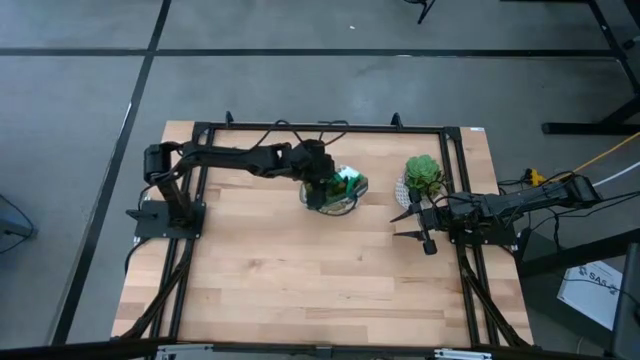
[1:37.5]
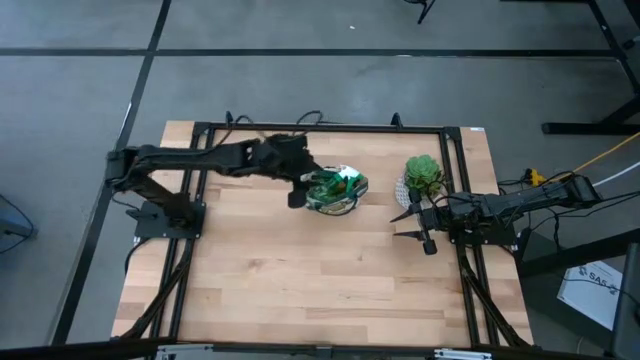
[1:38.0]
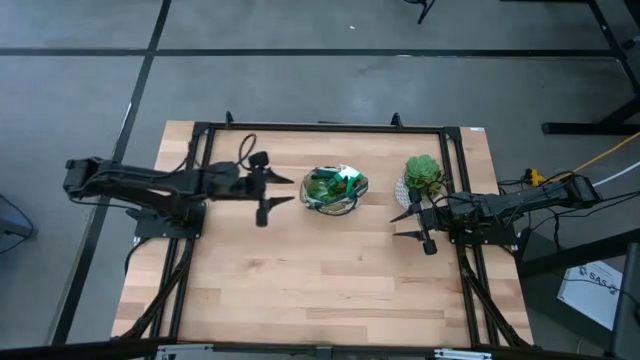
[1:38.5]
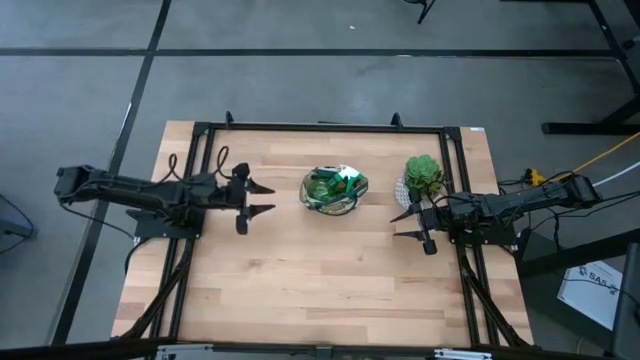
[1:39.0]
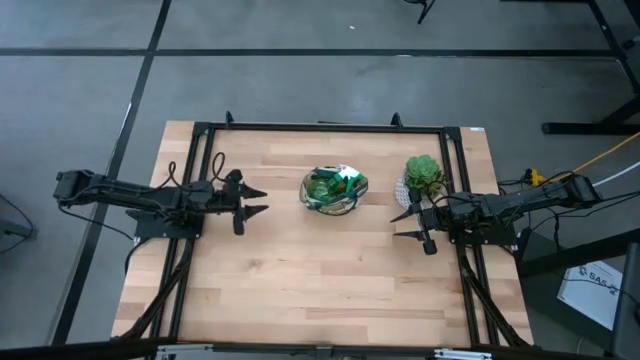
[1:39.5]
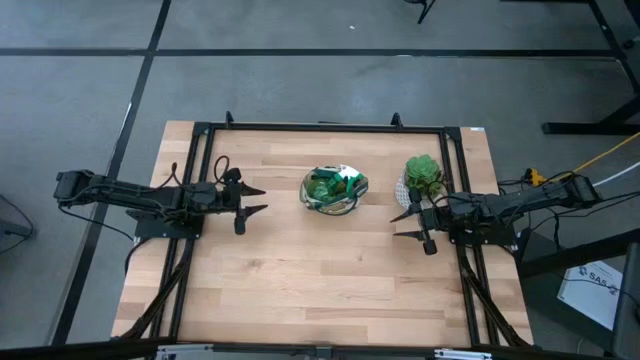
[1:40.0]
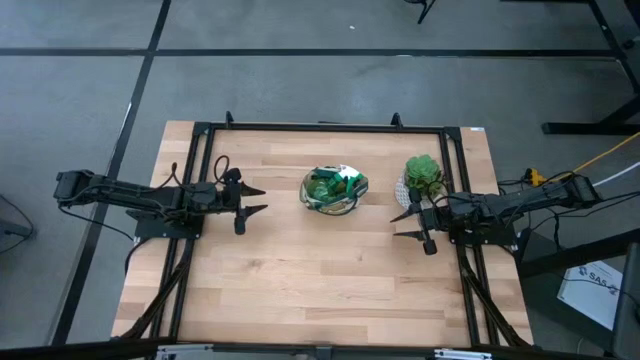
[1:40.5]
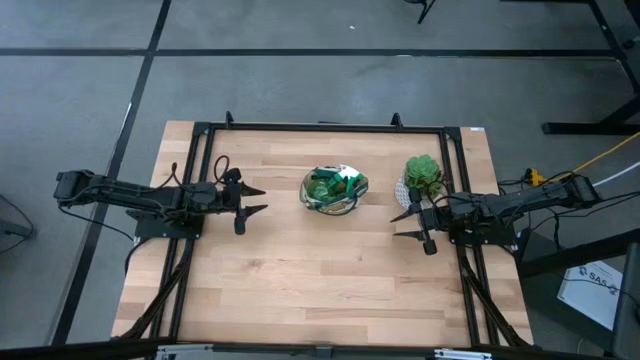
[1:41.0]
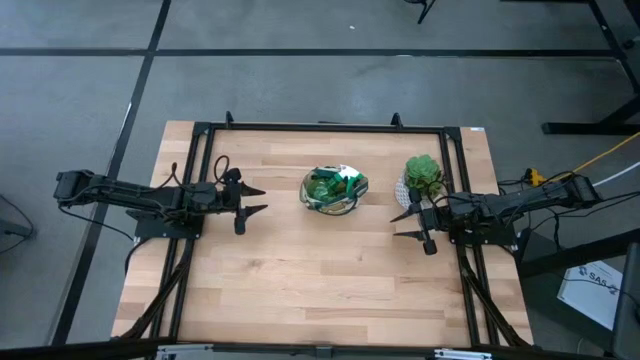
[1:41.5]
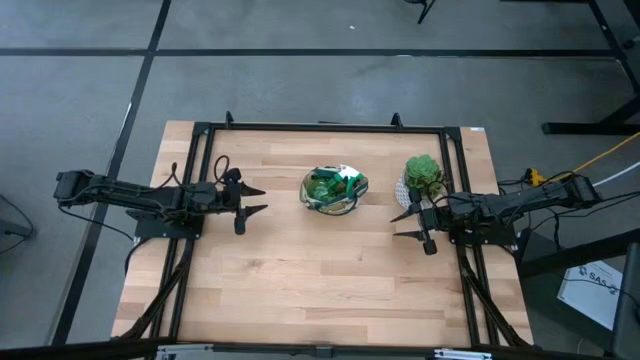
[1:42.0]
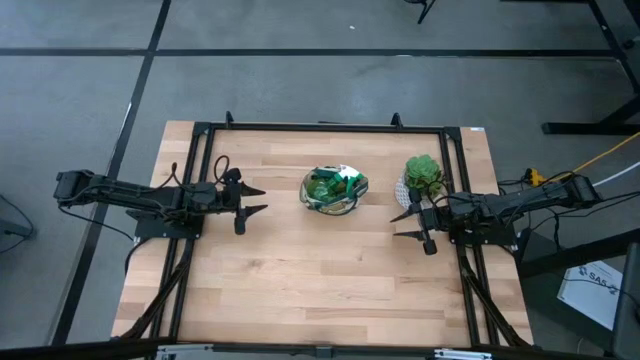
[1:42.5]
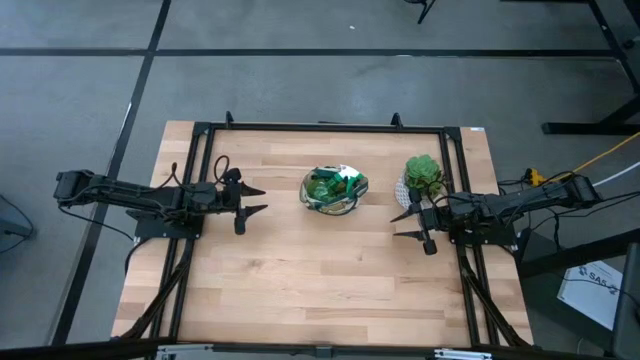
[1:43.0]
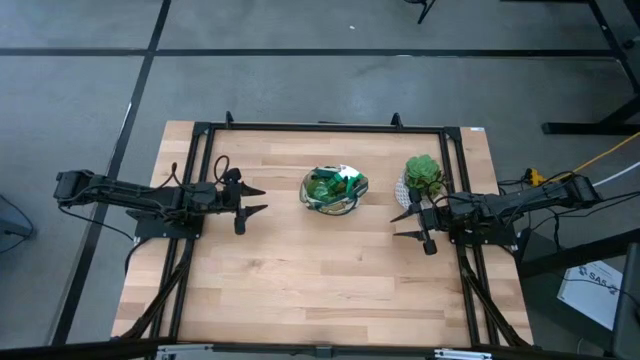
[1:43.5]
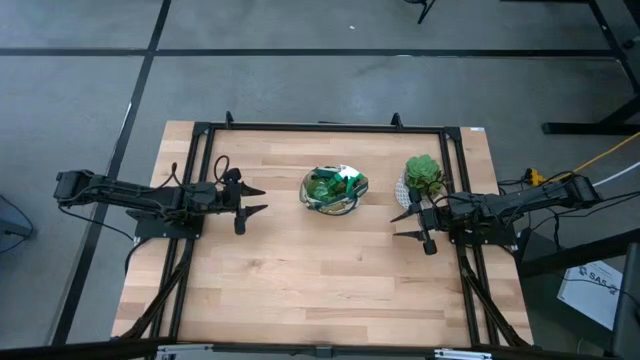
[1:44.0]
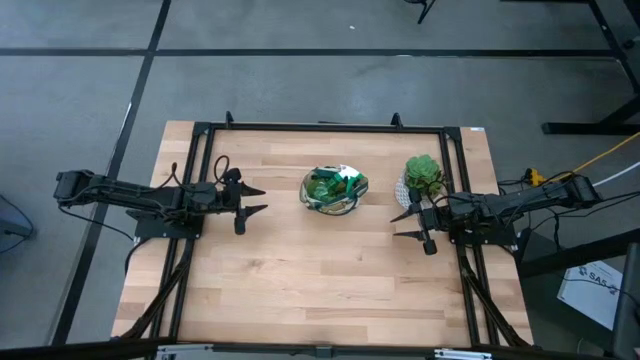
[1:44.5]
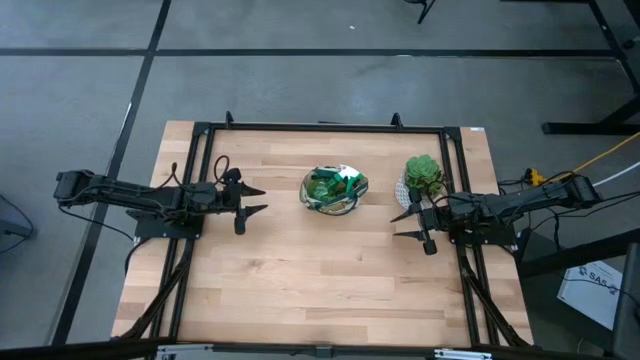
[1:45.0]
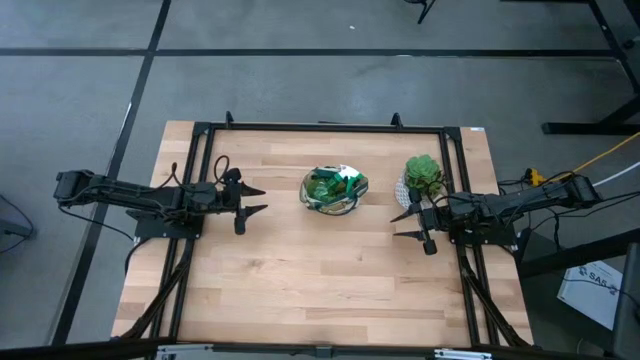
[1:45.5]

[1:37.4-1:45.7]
Task: Pick & Place Garden tools in Gardening bag
Return to Home Position

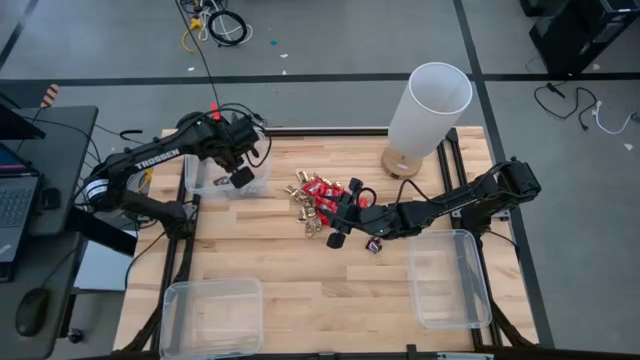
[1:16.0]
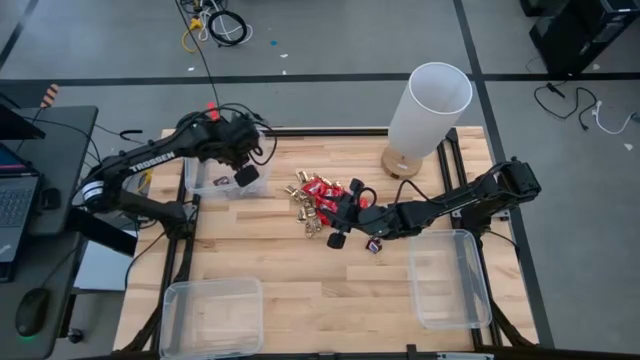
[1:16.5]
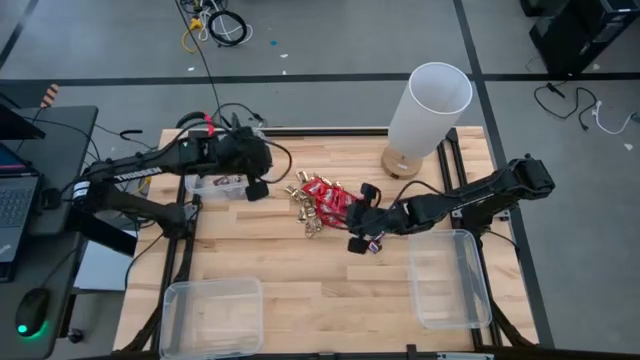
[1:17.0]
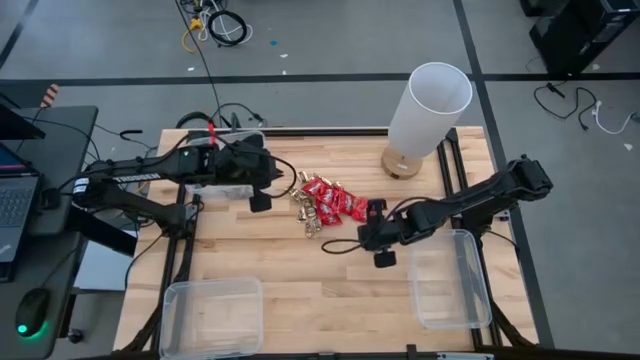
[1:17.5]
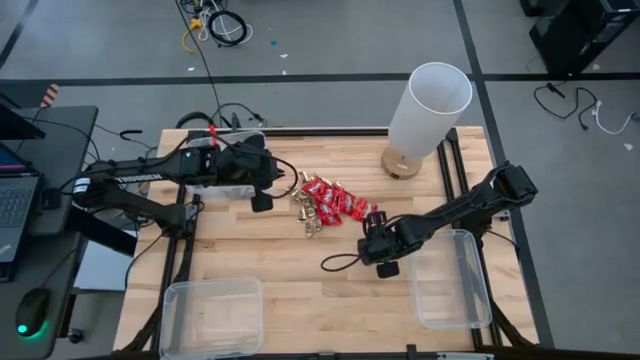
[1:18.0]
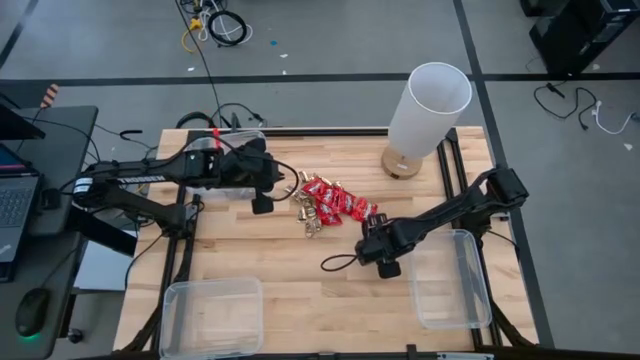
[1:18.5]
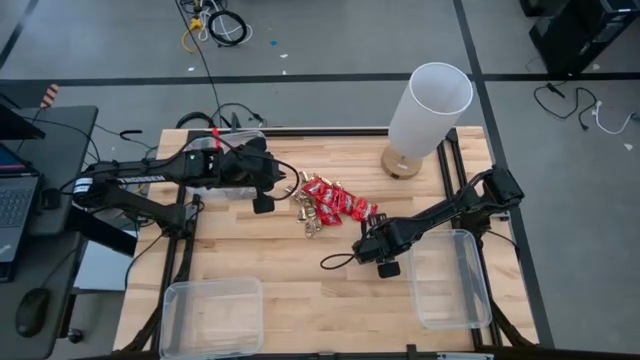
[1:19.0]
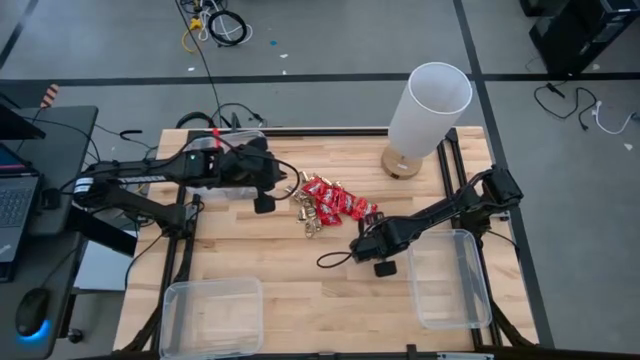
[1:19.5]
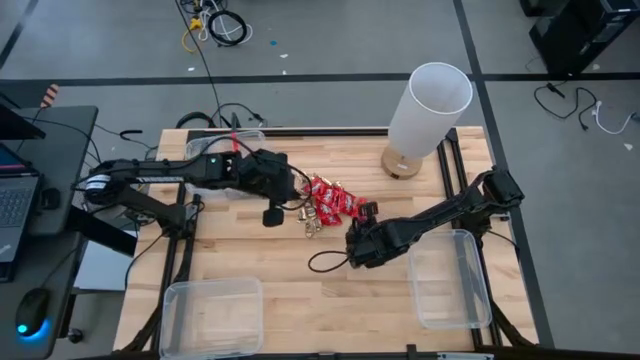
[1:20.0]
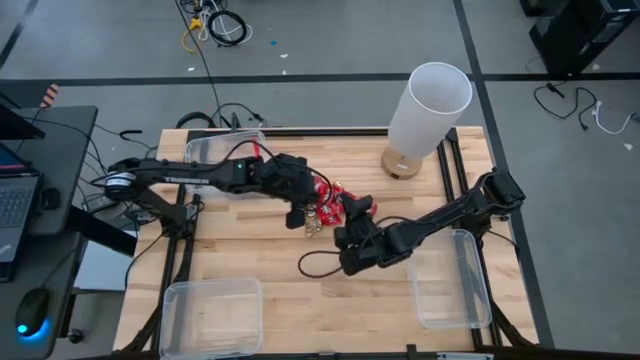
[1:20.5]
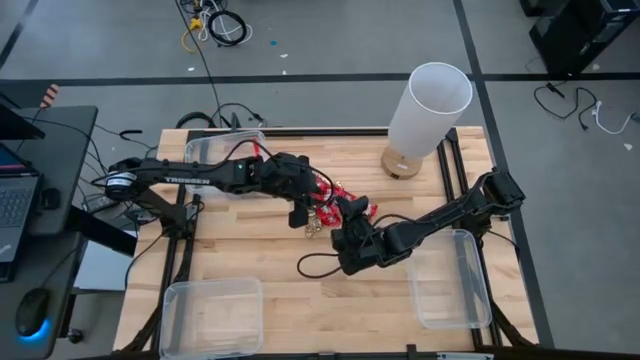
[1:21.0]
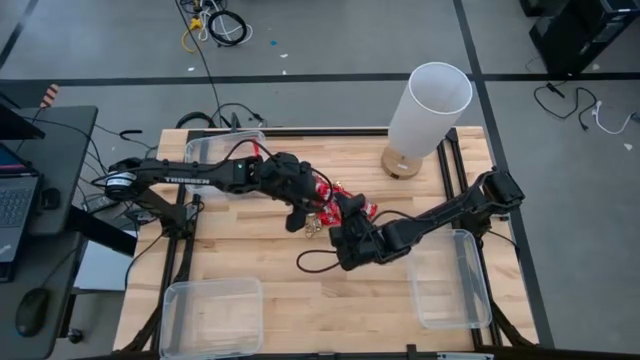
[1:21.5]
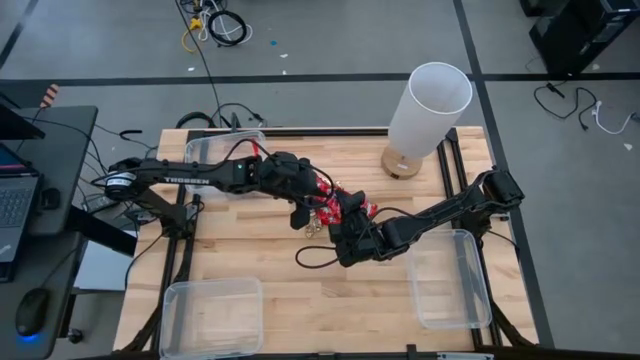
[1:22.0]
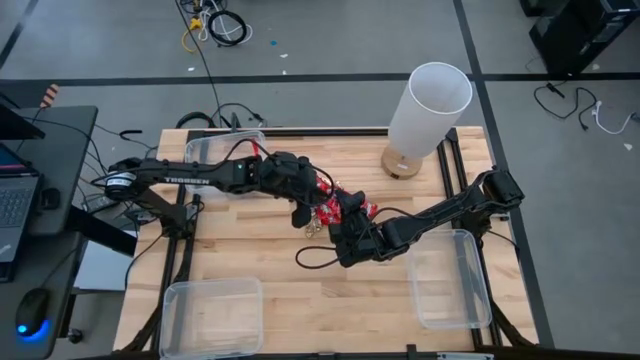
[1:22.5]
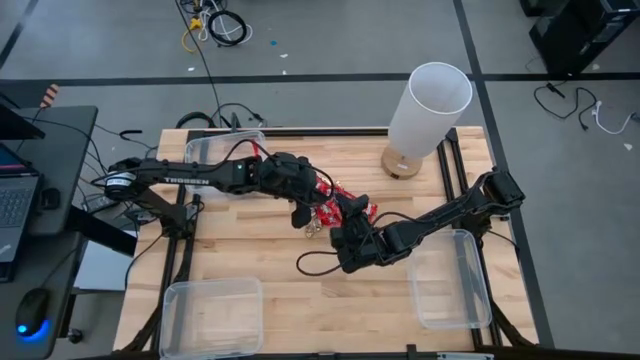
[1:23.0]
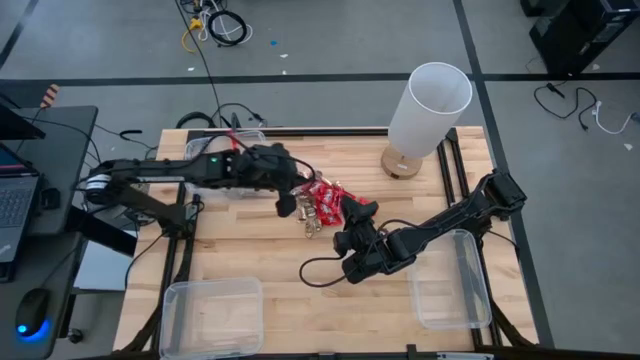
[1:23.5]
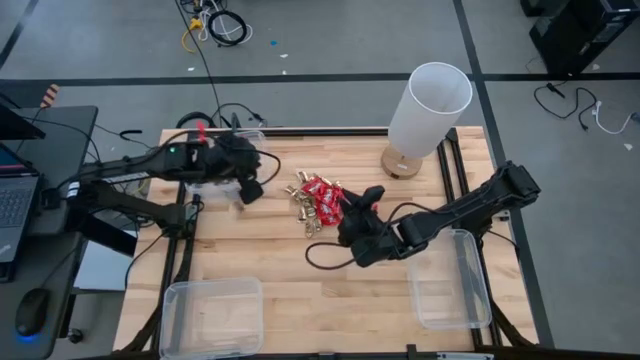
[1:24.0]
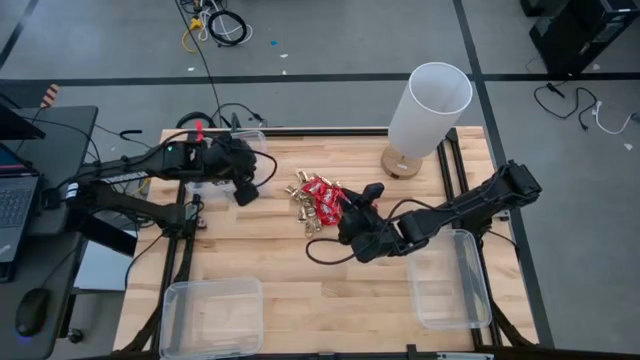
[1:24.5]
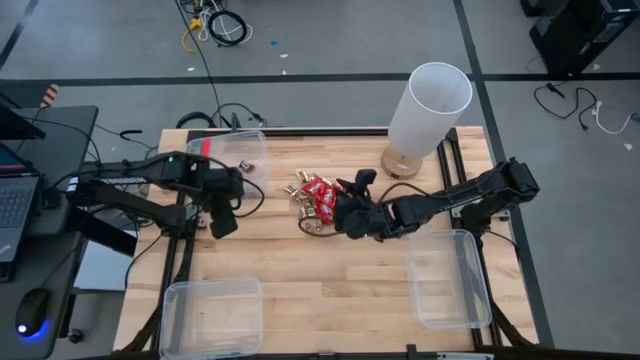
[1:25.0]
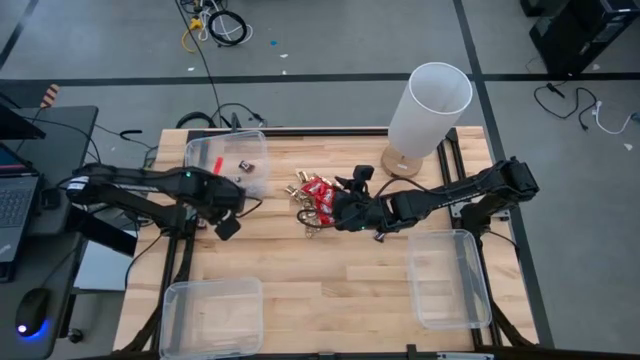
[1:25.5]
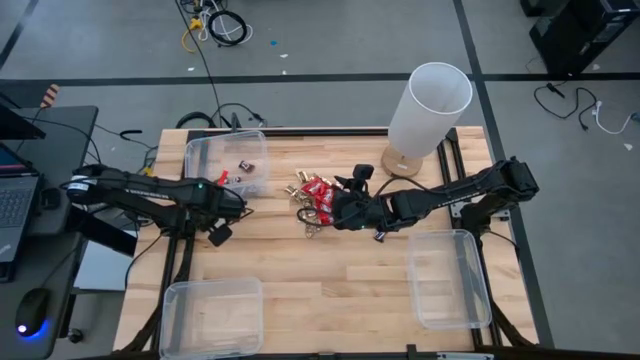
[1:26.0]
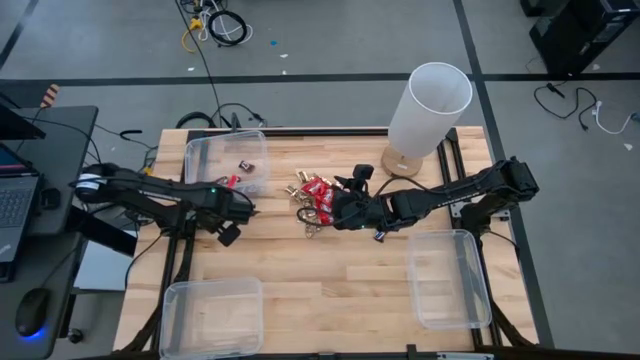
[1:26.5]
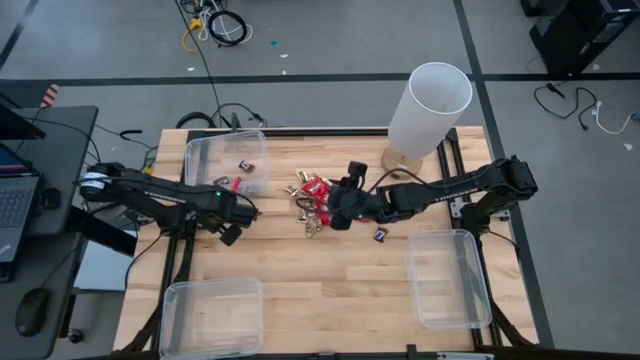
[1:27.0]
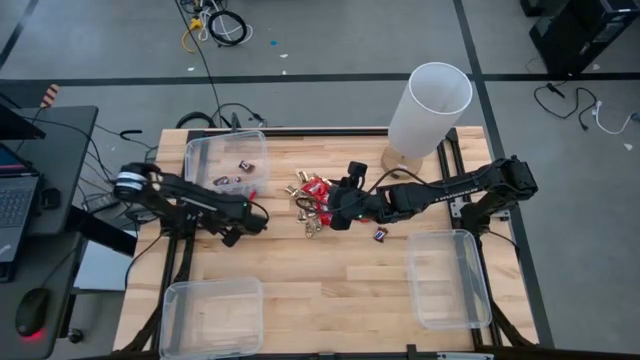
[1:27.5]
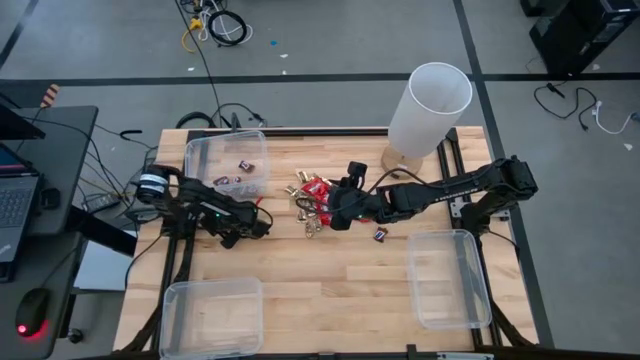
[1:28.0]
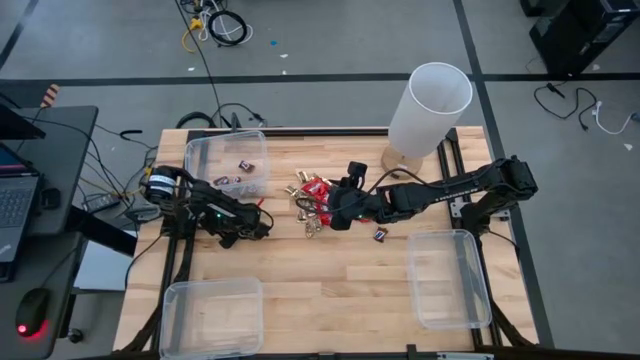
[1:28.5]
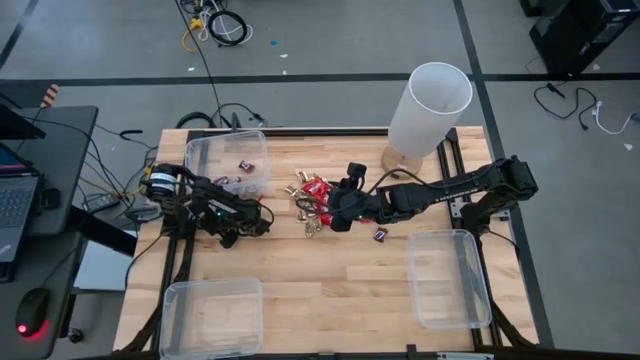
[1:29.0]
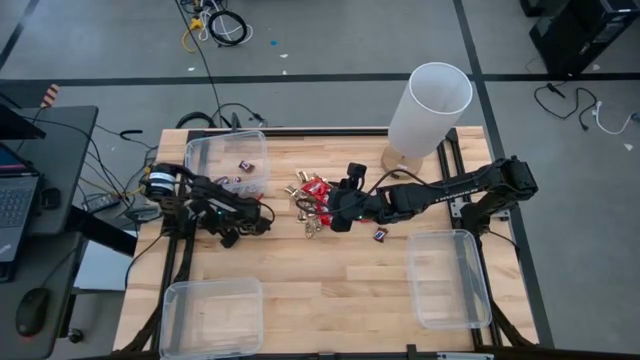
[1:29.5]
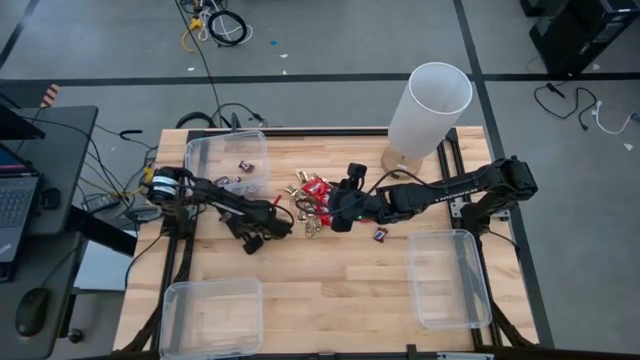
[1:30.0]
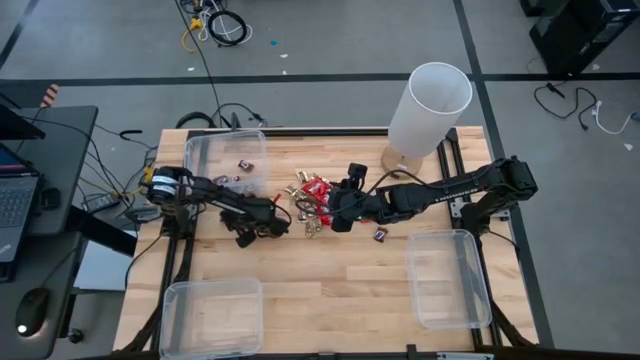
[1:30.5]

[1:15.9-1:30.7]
Task: Sort candy
Put the brown chocolate into the top left transparent bin
